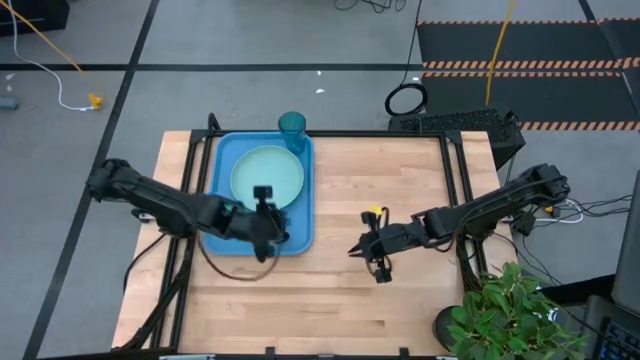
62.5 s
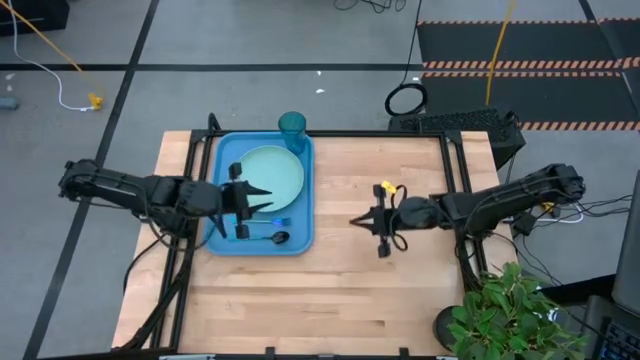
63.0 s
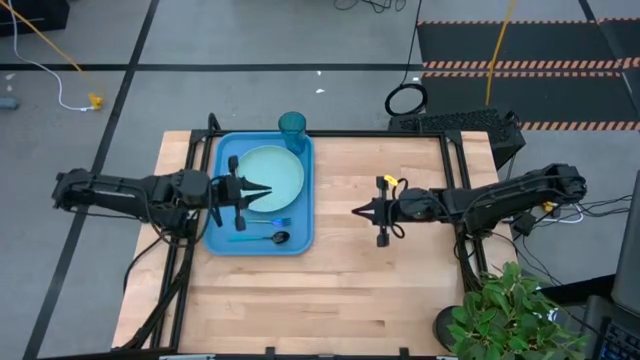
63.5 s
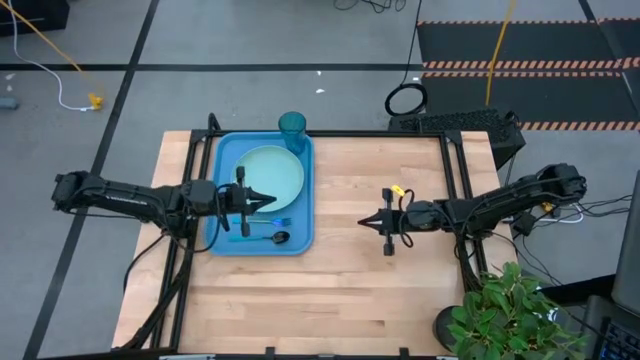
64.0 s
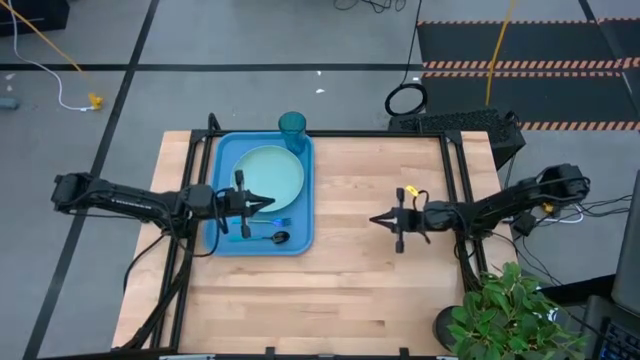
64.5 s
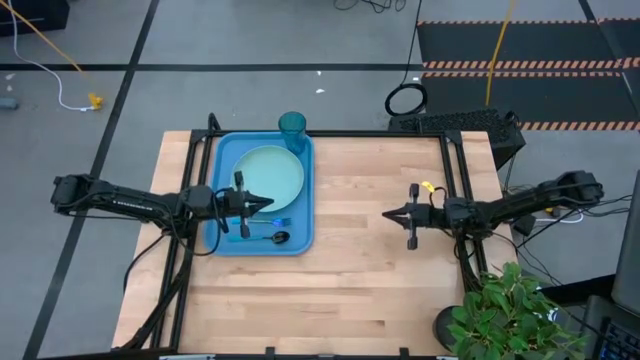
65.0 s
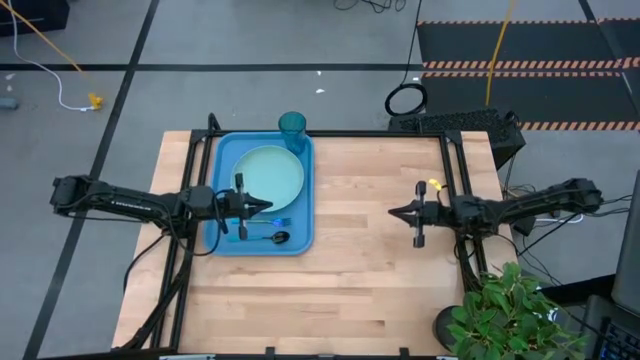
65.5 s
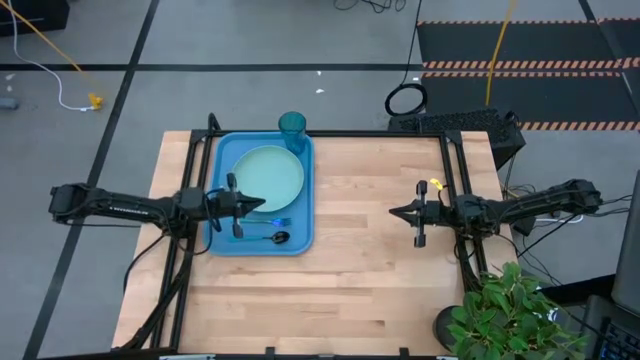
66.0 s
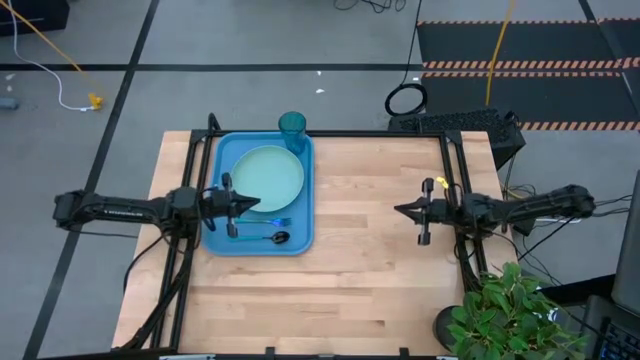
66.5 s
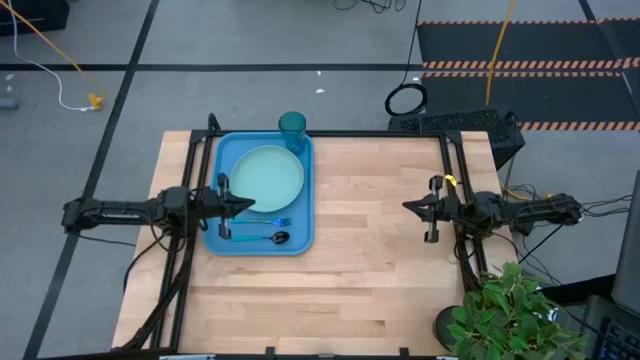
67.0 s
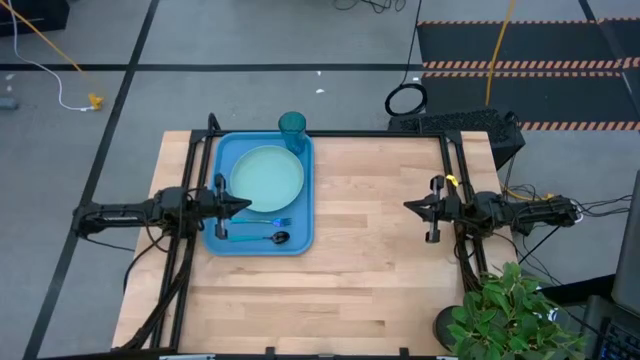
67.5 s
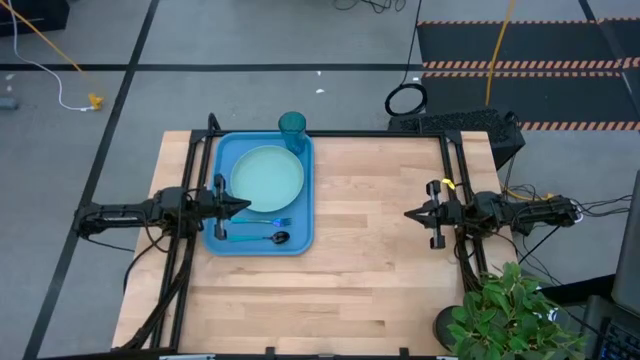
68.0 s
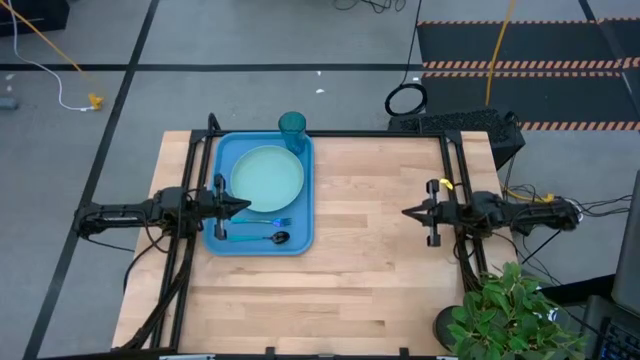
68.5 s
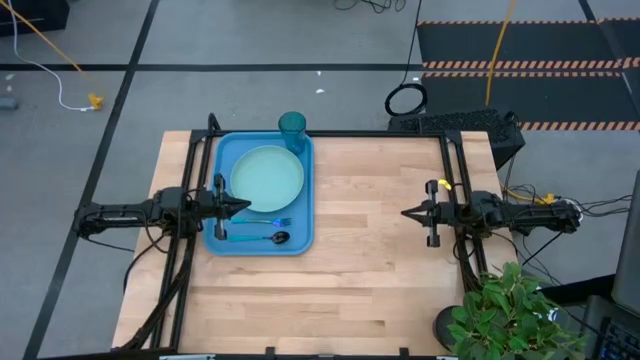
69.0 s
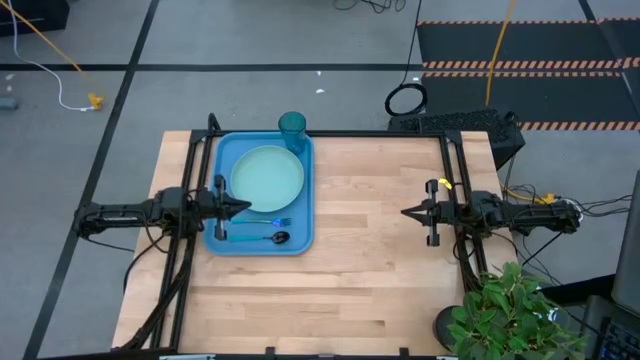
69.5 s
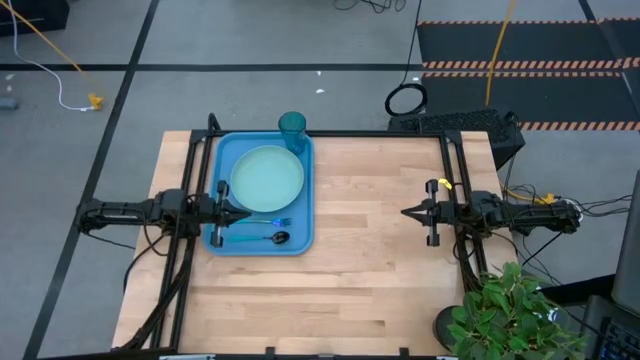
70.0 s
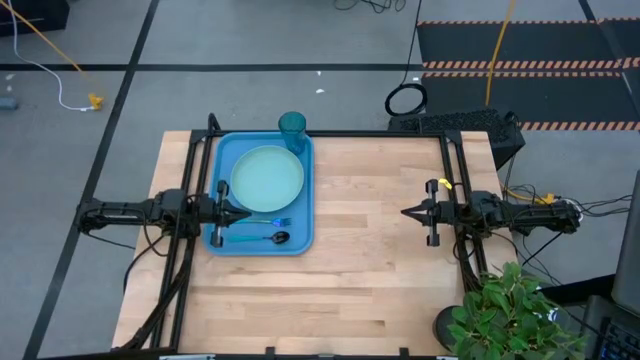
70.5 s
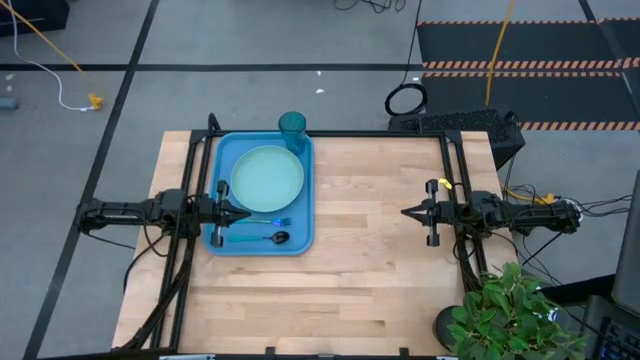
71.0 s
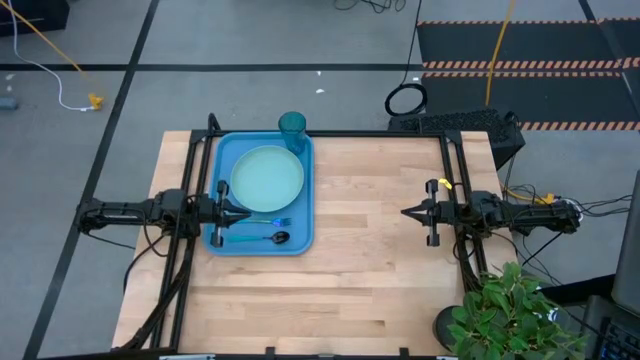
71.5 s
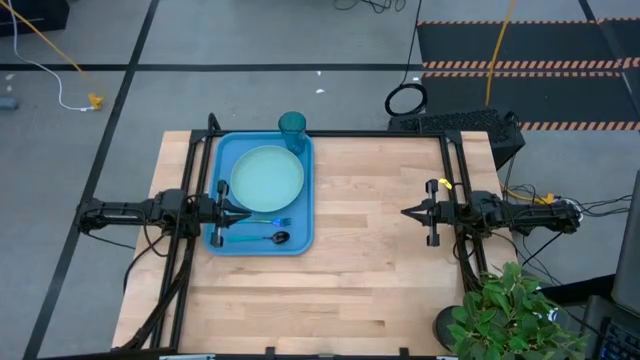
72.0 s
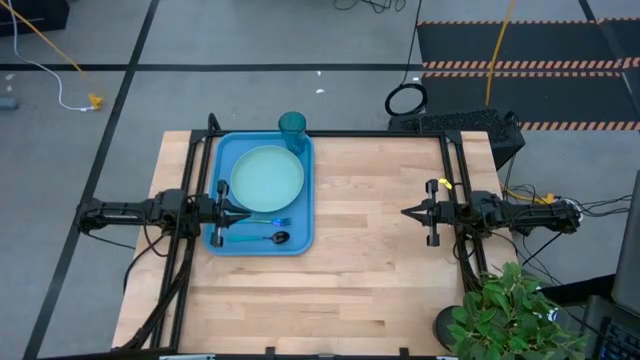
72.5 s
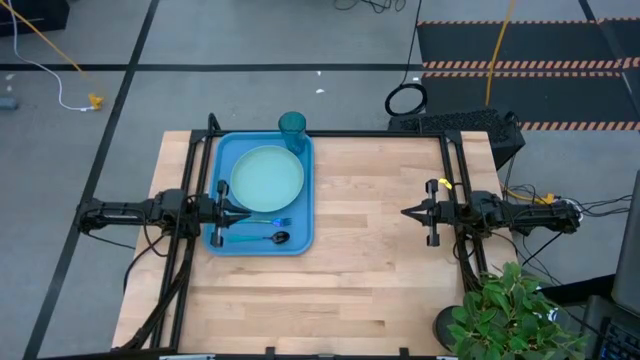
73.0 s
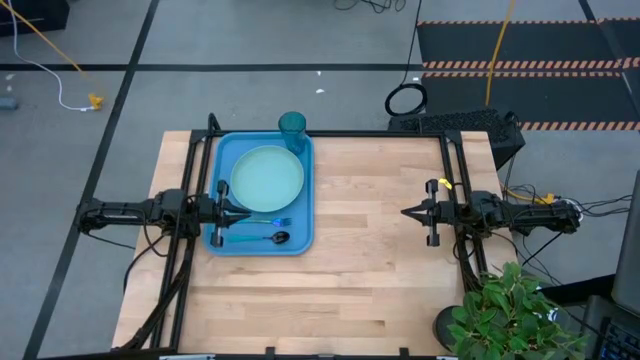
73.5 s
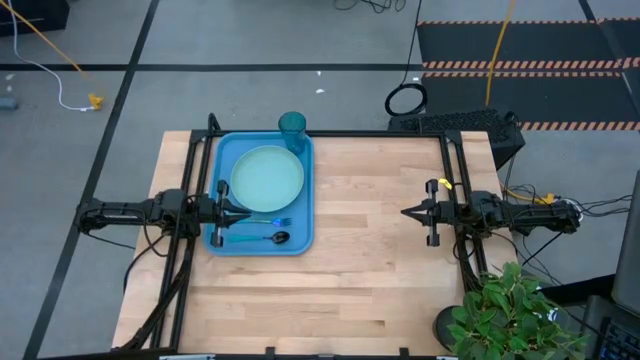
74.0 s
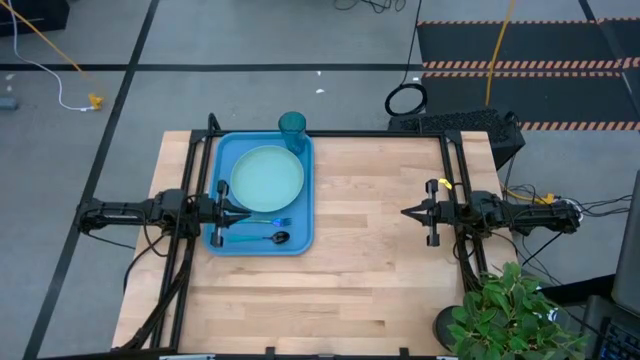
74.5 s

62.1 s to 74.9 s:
Task: Pick and place plate/cup/fork/spoon on tray
Return to Home Position

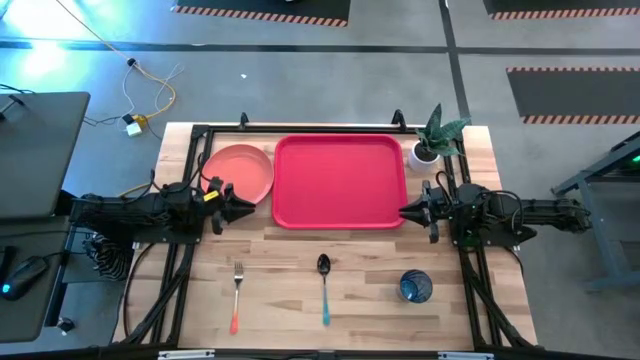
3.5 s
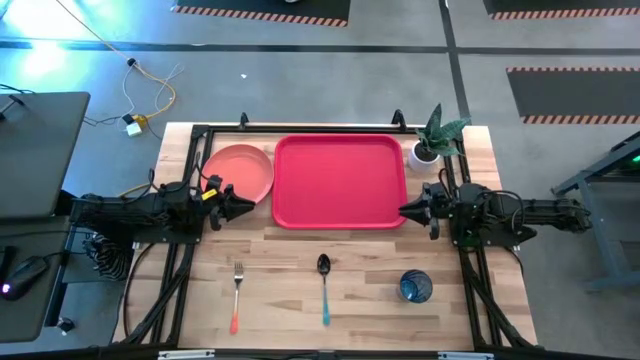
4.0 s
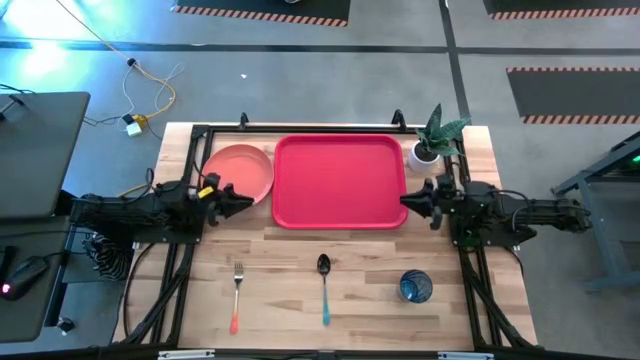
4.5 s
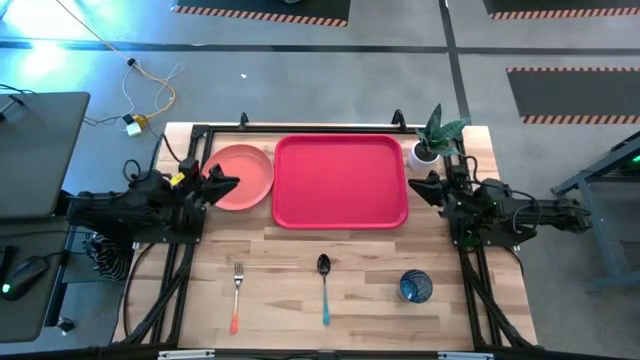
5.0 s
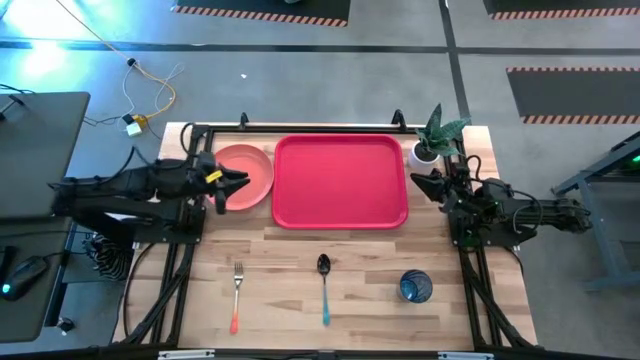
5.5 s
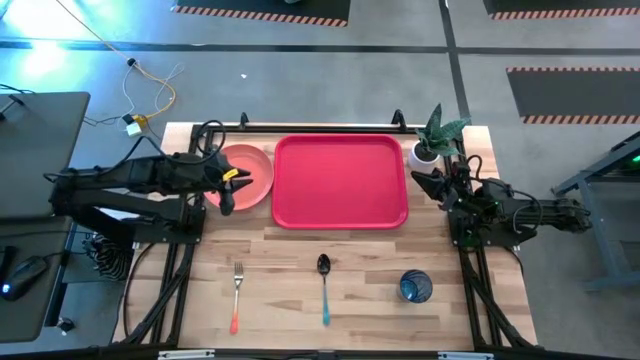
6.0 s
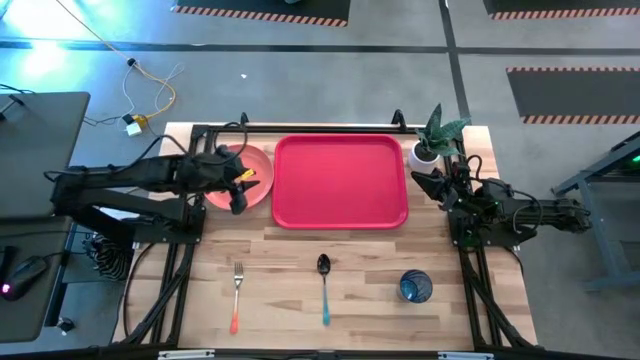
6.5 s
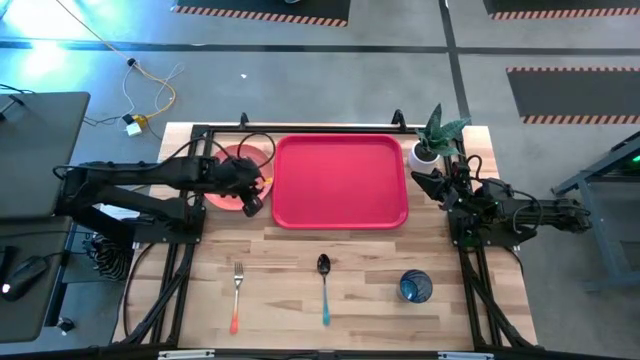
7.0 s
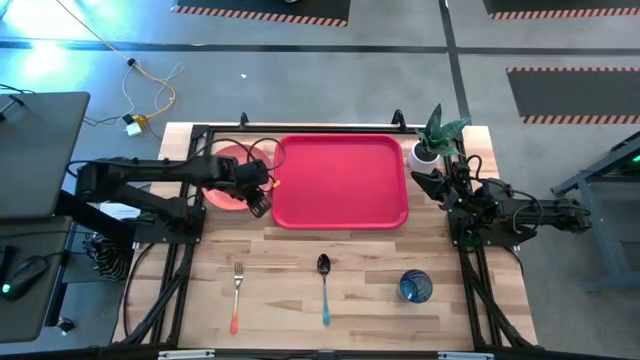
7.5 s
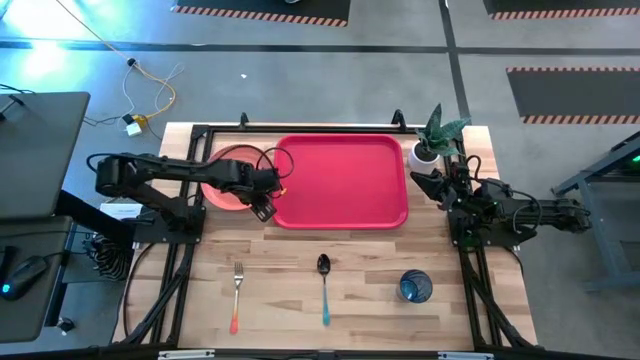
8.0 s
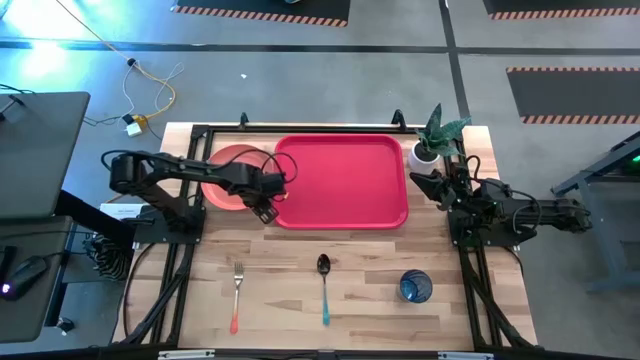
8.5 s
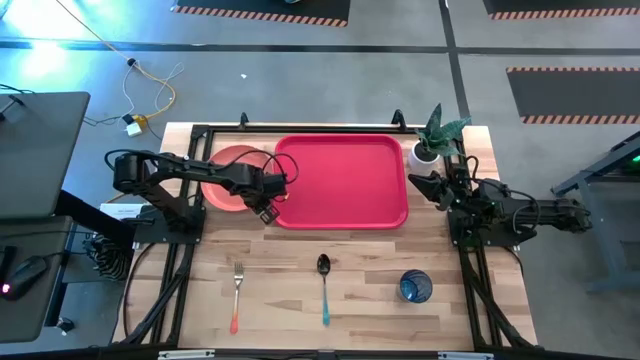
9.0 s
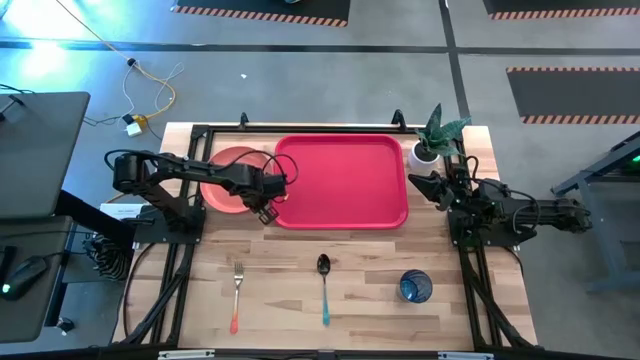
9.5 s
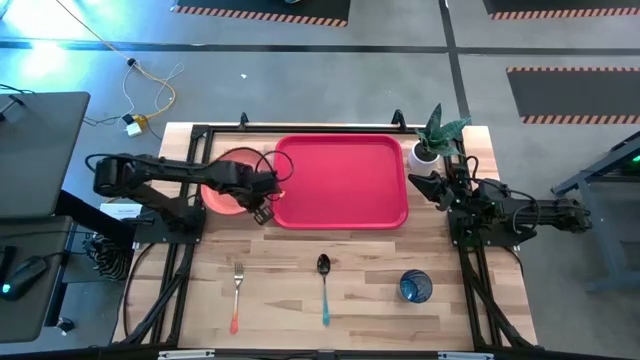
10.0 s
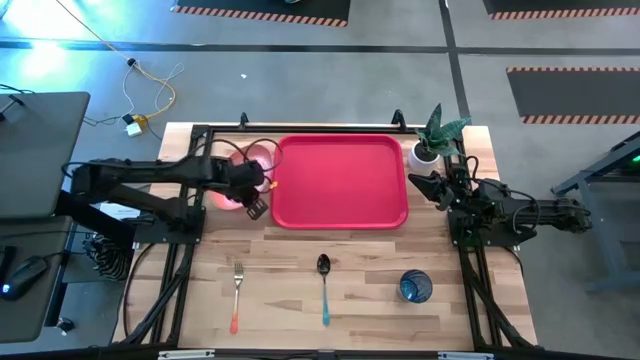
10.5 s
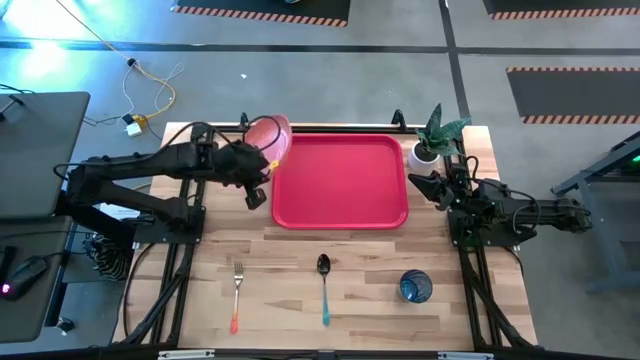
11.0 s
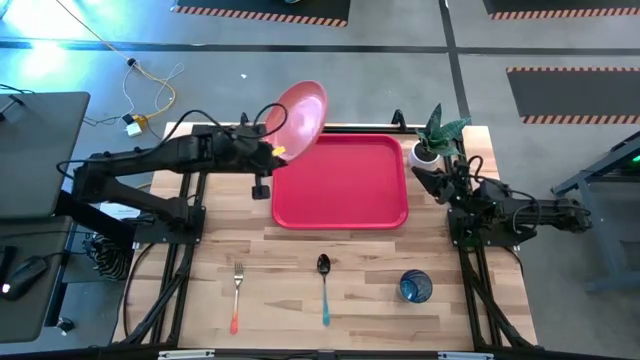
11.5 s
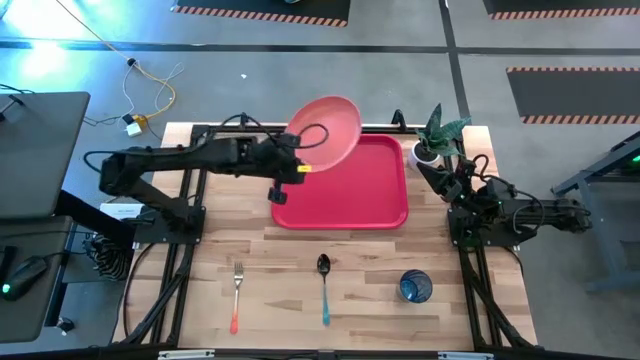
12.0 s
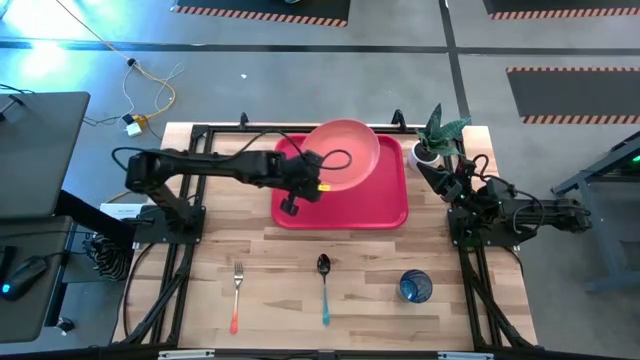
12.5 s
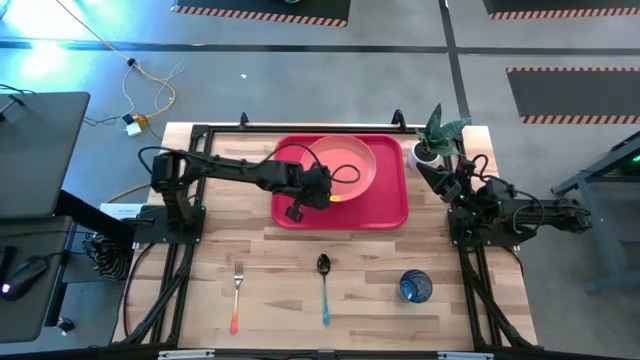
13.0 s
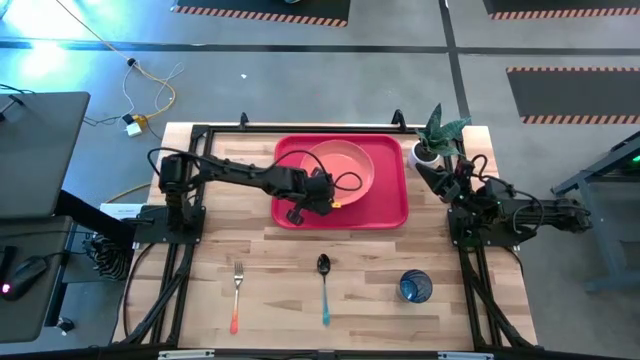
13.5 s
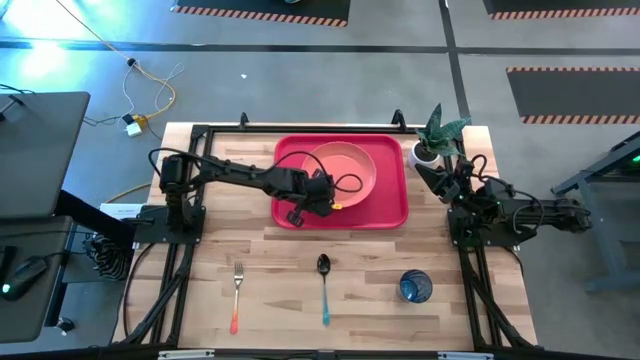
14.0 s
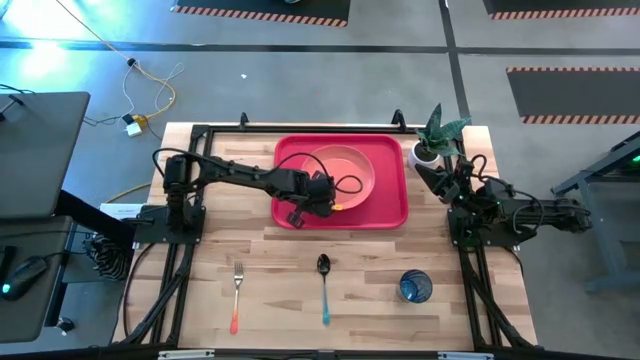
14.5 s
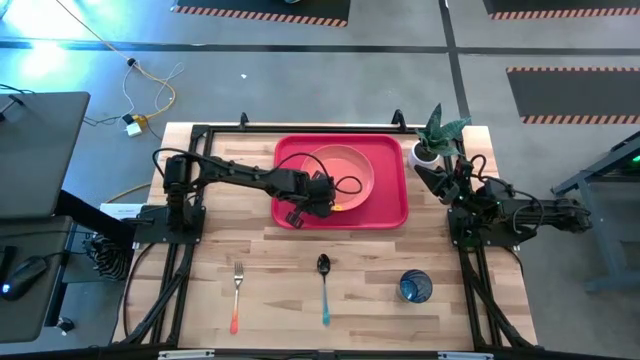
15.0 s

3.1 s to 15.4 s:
Task: Pick and place plate/cup/fork/spoon on tray
Put the orange plate on the tray
